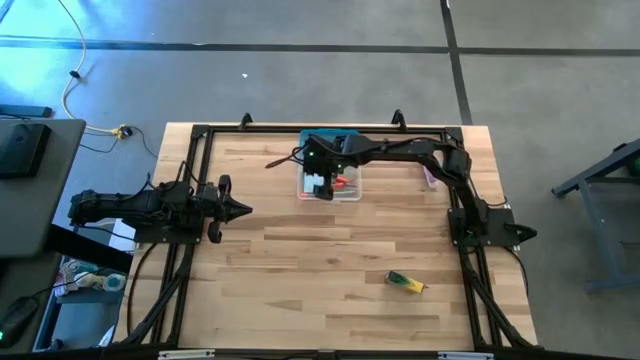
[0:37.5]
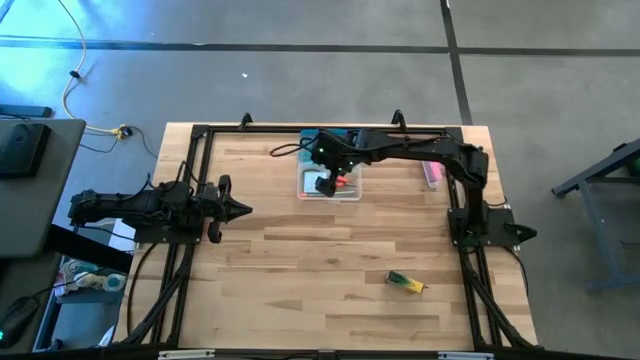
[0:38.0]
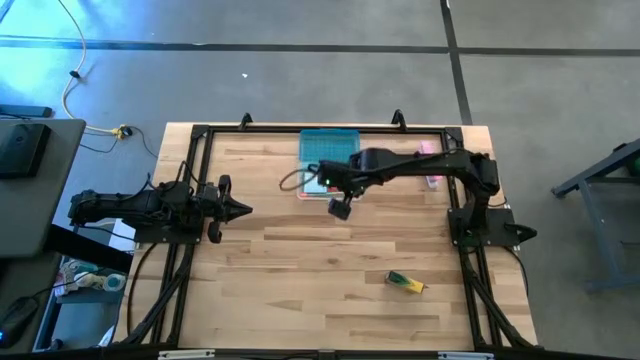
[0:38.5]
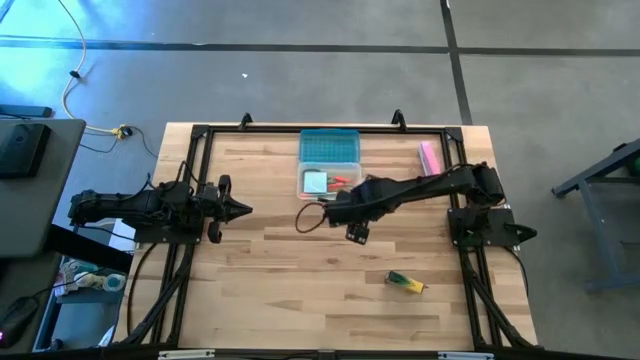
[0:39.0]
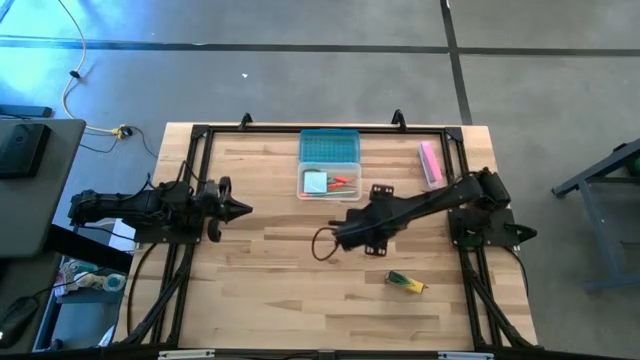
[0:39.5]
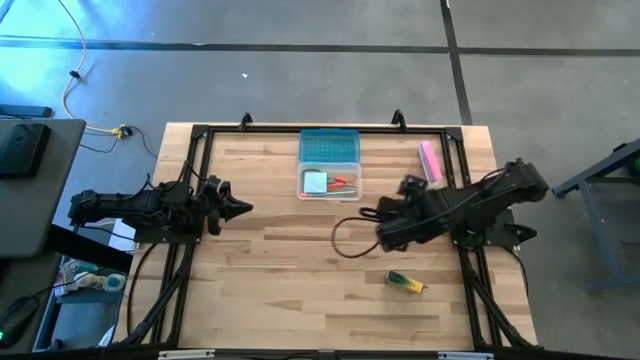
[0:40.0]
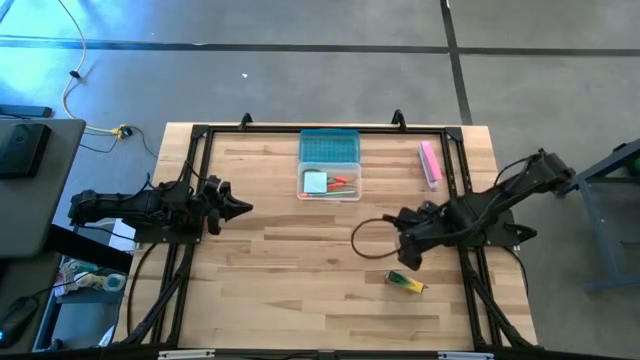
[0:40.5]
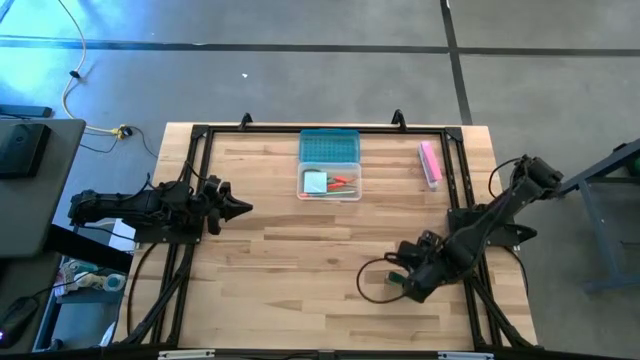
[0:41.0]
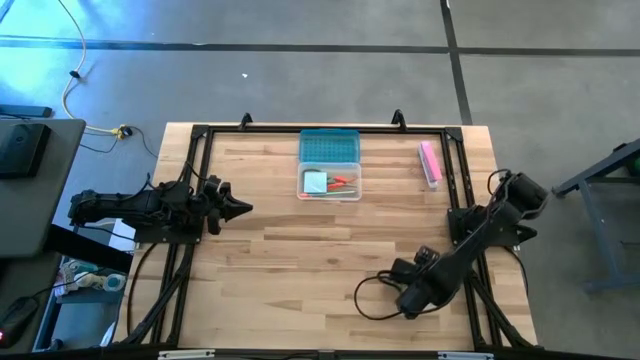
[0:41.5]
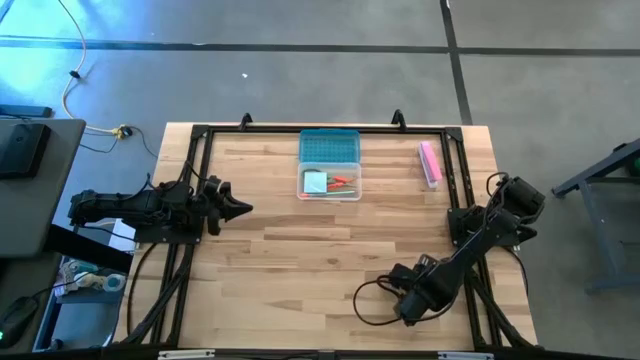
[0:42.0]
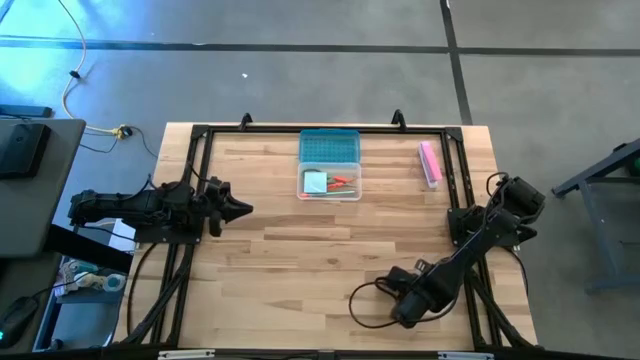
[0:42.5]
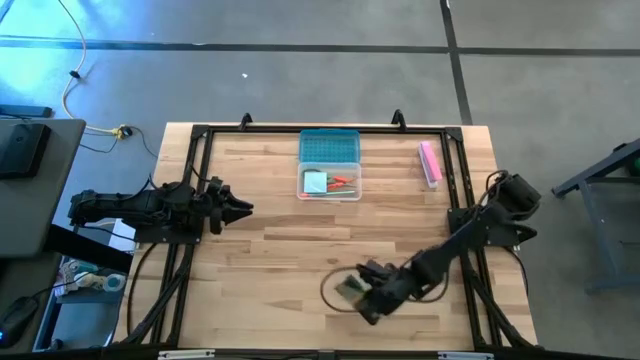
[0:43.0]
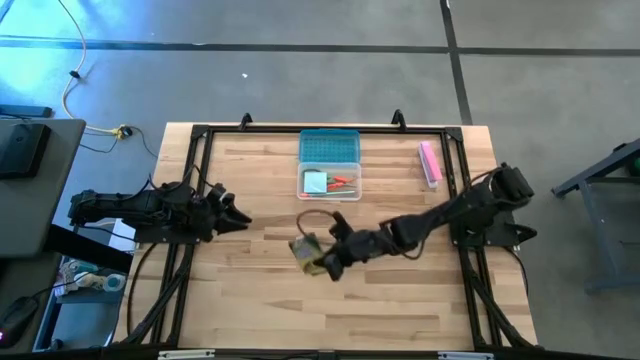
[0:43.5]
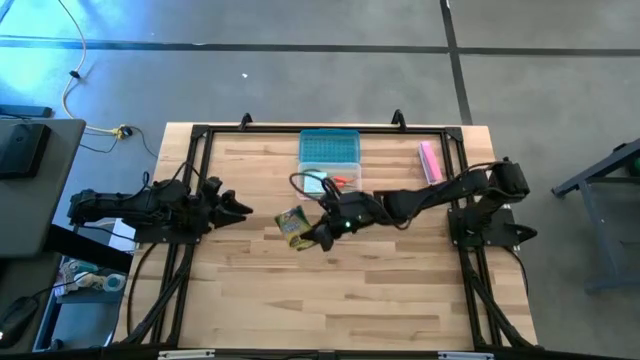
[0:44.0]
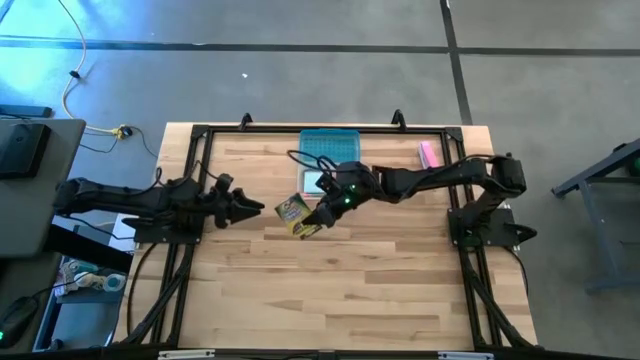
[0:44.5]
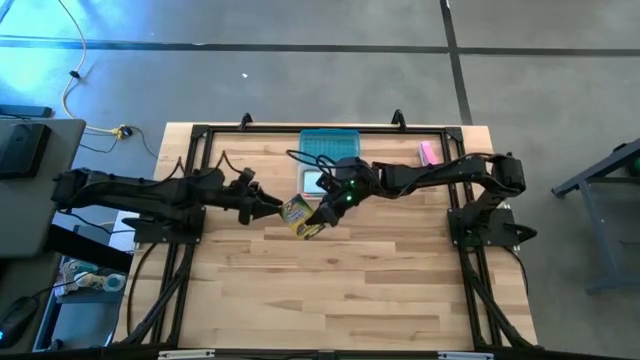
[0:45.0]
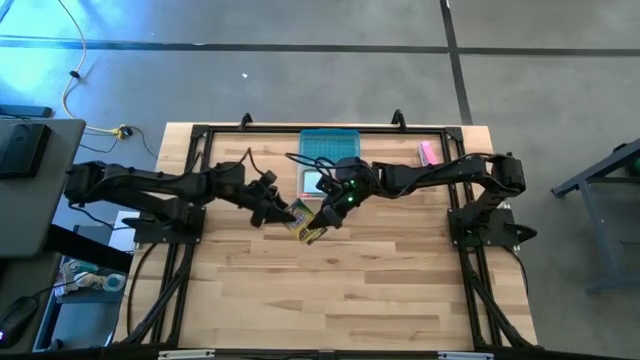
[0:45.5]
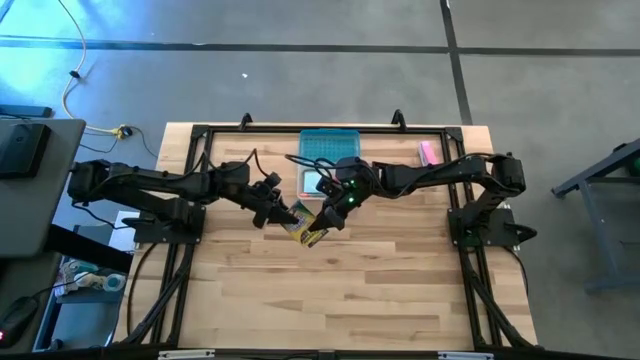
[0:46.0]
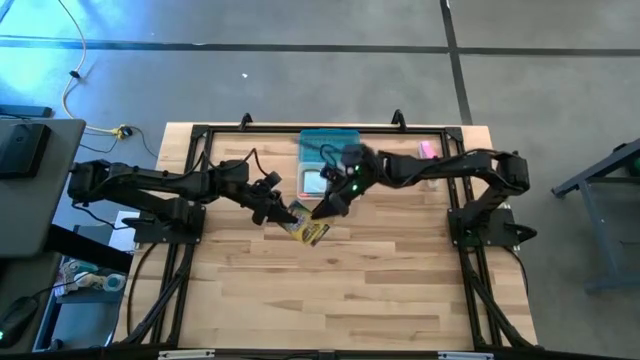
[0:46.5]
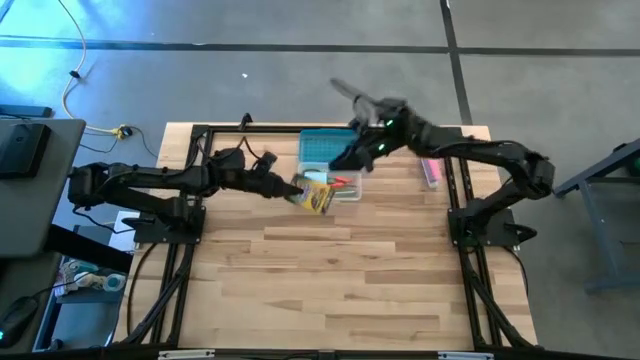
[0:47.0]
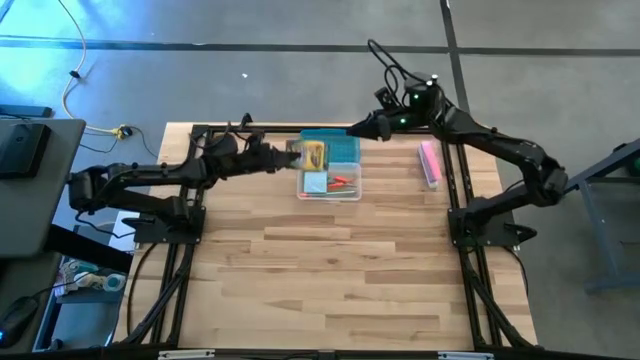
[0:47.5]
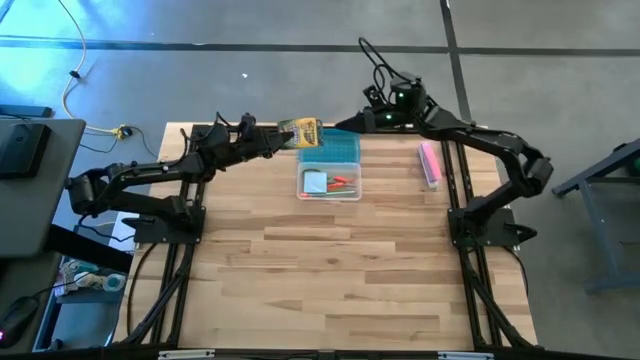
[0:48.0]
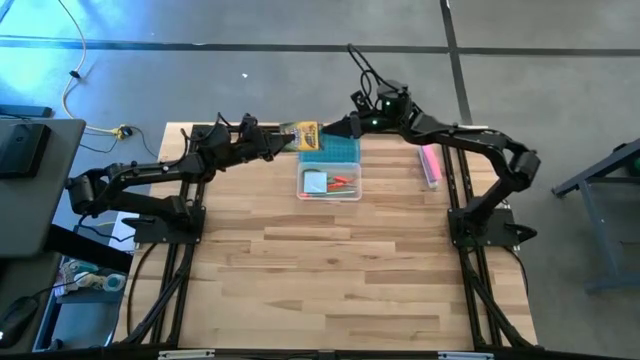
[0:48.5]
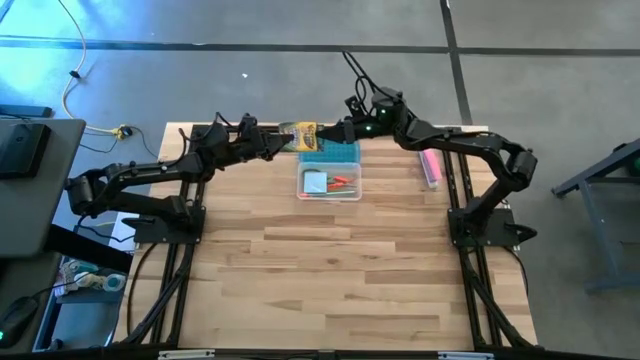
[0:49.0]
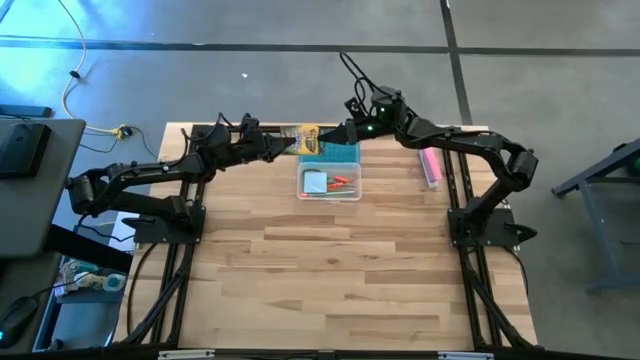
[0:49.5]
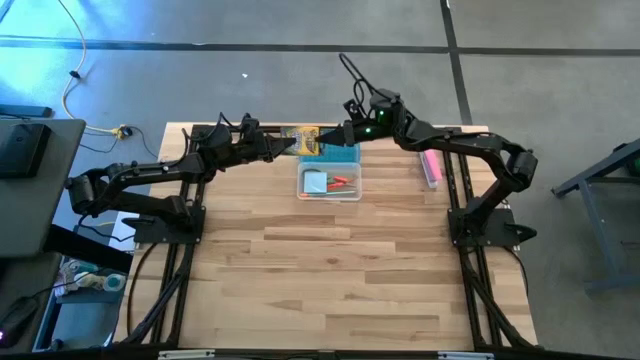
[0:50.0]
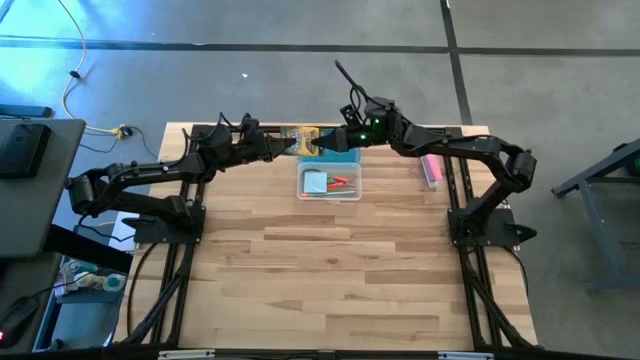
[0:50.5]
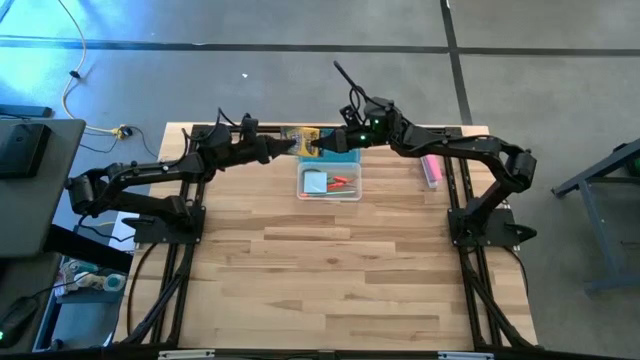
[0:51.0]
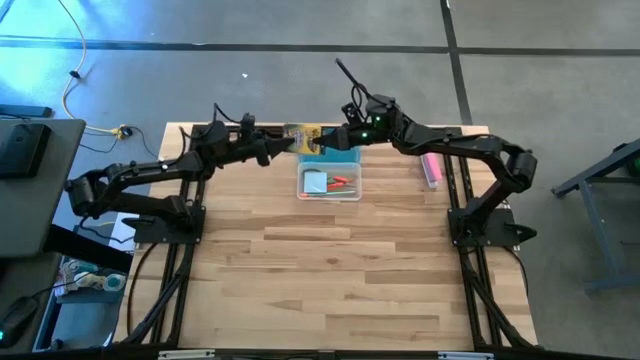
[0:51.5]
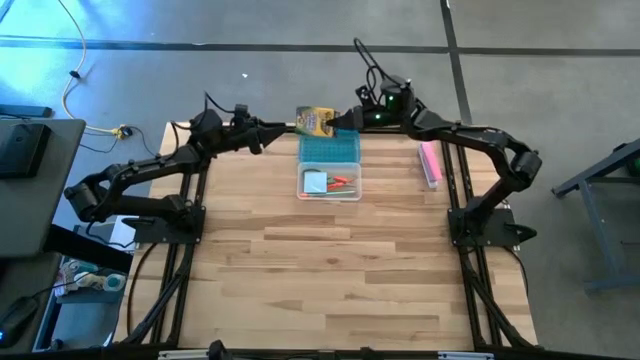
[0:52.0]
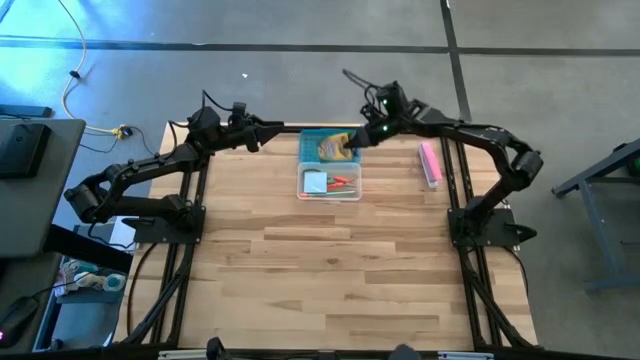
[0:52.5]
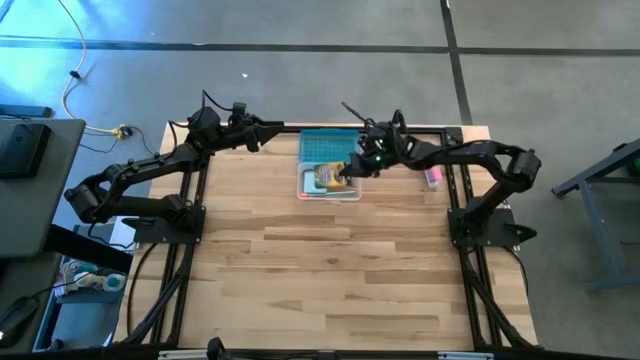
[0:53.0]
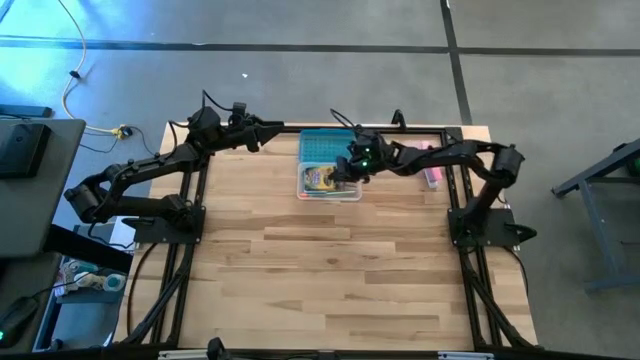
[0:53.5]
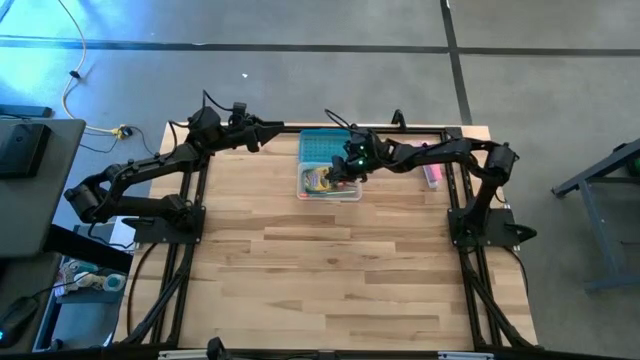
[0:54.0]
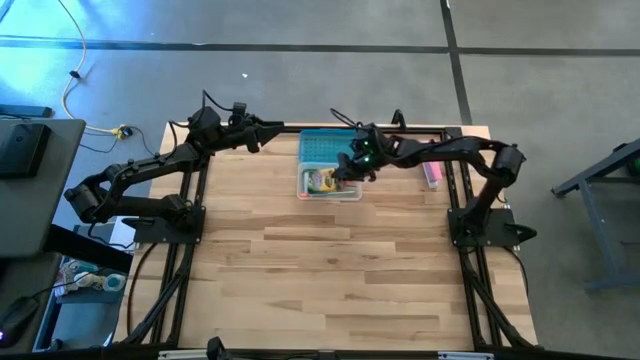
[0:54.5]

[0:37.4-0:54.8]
Task: Pack school essentials
Put the yellow crayon box into the supply box

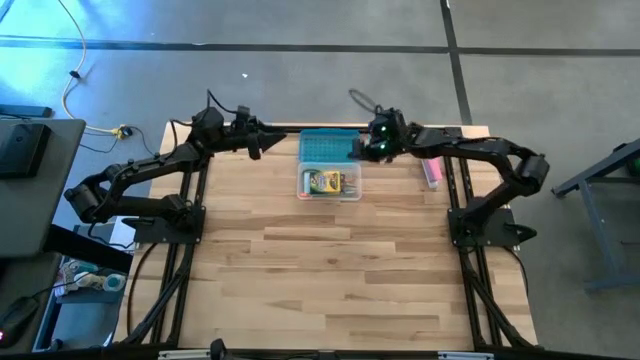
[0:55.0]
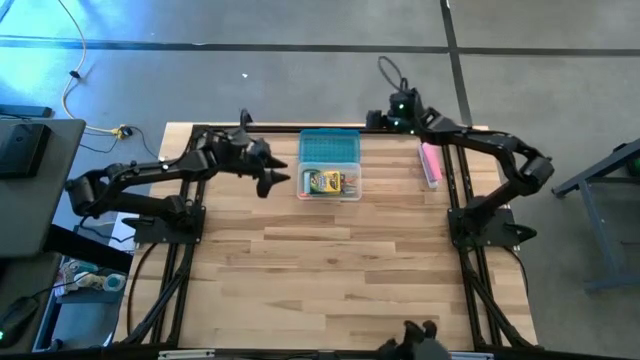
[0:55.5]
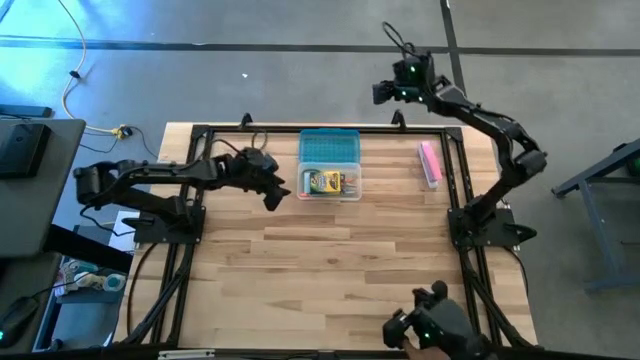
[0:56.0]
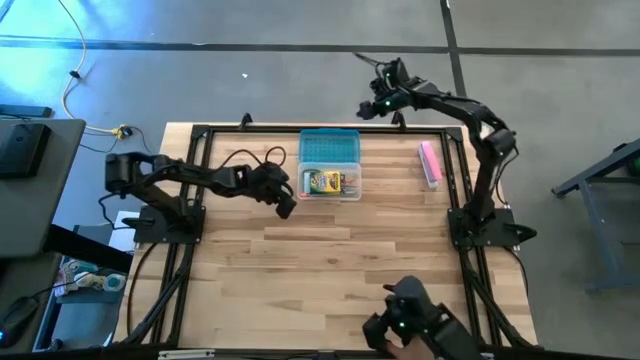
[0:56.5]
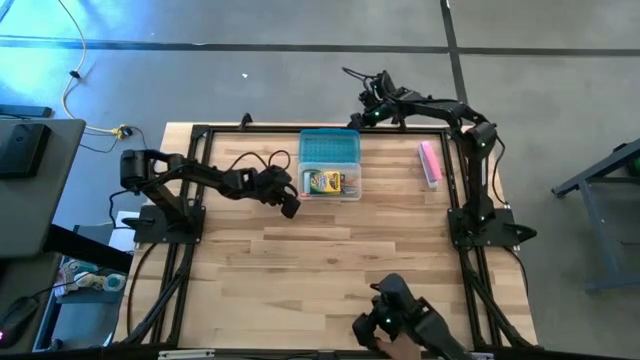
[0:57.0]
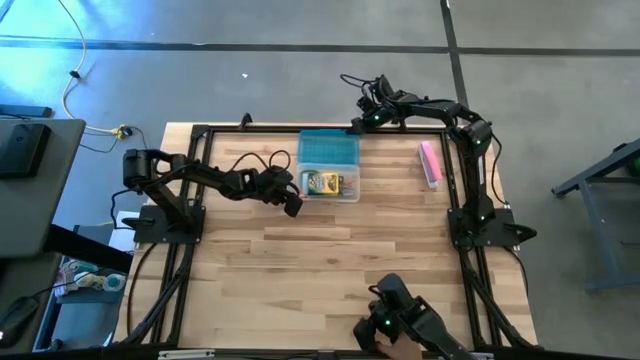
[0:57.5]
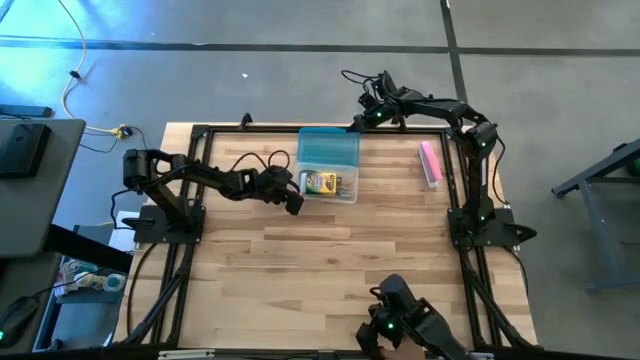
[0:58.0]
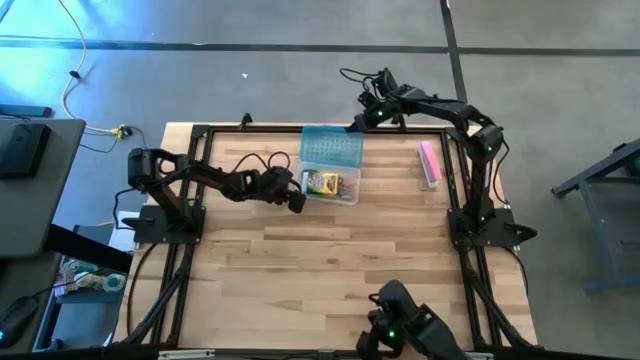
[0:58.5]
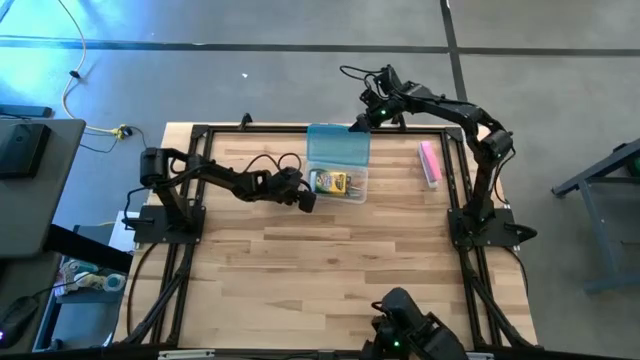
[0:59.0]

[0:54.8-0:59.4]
Close the supply box
